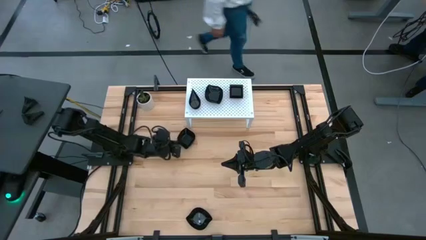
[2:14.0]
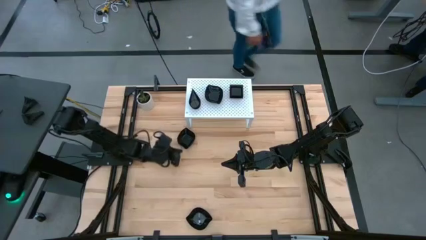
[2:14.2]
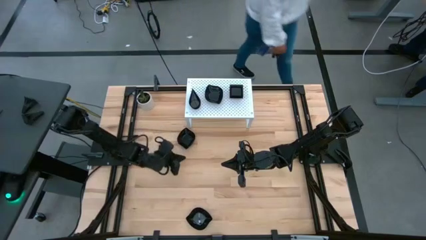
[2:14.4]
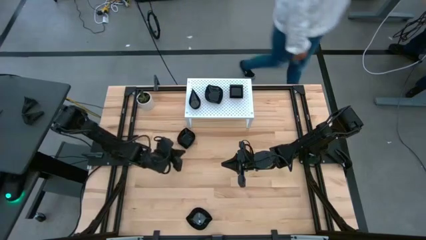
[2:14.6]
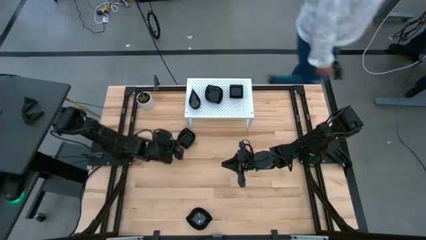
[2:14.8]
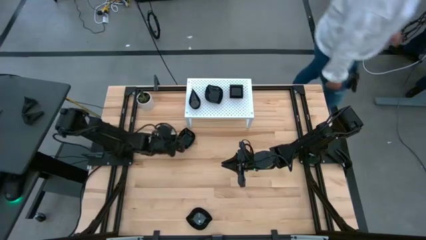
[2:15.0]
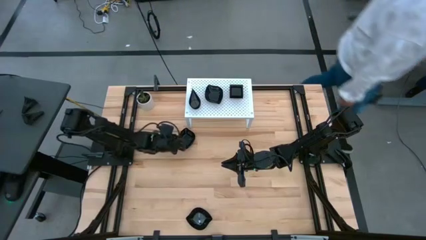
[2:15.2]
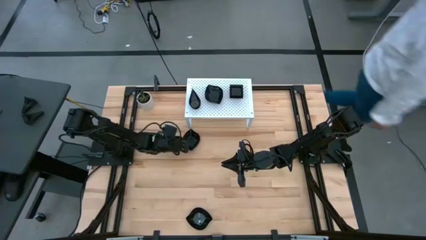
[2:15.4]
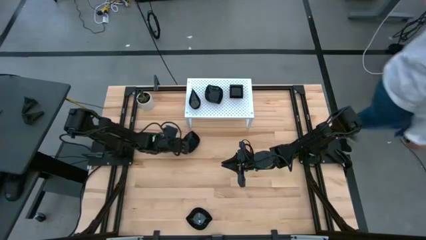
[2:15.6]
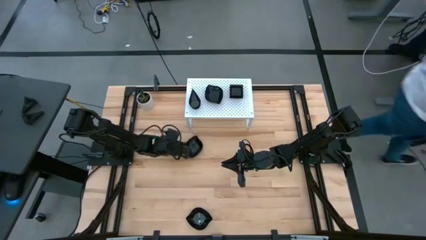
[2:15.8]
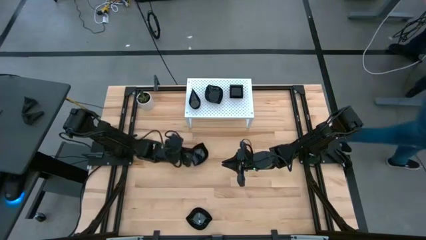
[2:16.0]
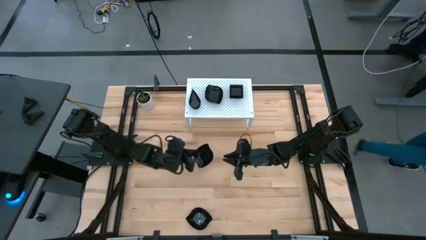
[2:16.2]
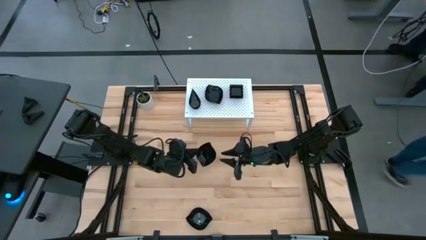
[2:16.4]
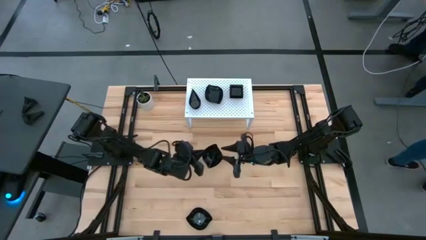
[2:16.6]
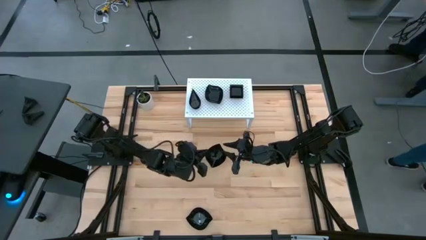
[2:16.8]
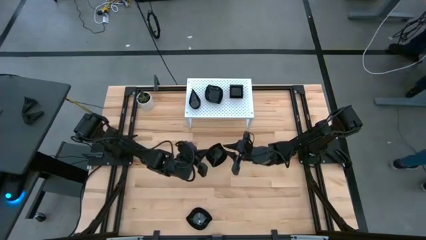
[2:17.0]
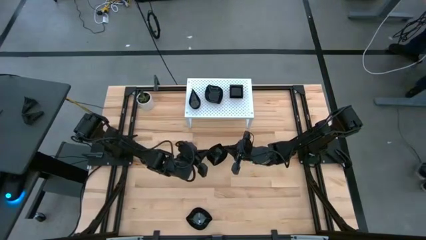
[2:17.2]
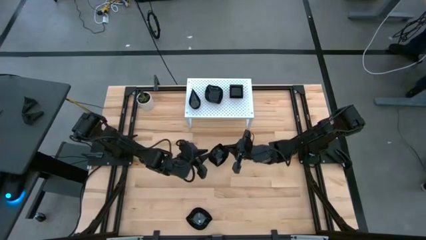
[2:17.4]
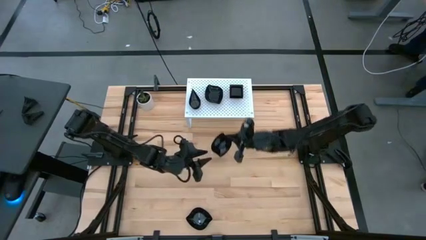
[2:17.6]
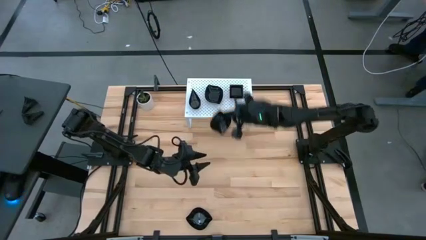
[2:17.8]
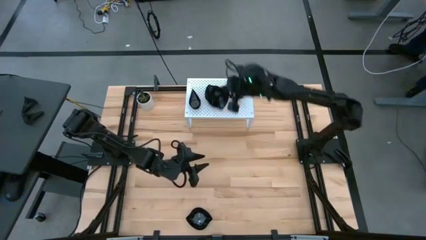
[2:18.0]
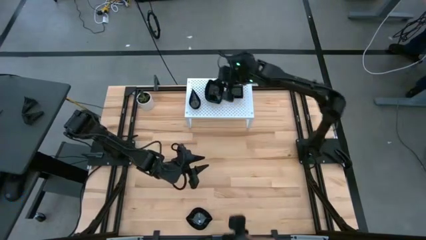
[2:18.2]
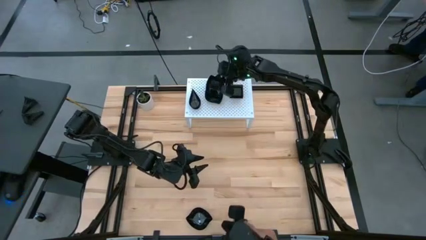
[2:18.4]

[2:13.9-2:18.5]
Task: Pick & Place Mini shaped plates
Stack the black leaf-shaped plate on top of the other black leaf-shaped plate on the shelf

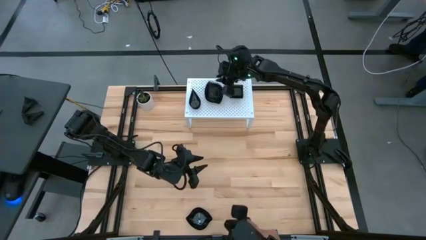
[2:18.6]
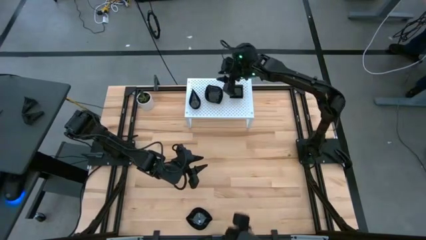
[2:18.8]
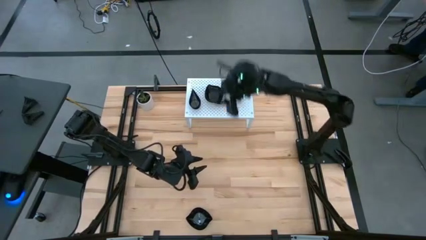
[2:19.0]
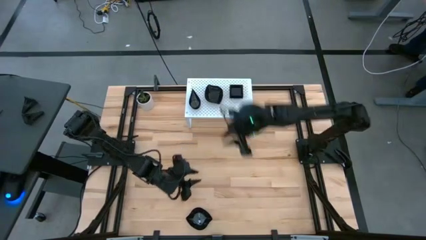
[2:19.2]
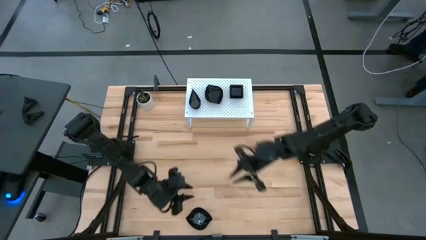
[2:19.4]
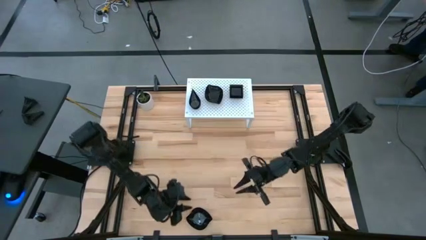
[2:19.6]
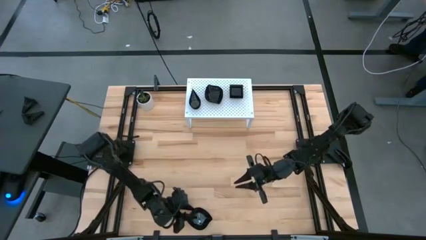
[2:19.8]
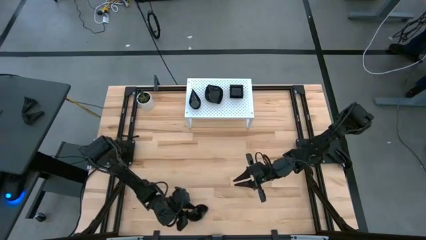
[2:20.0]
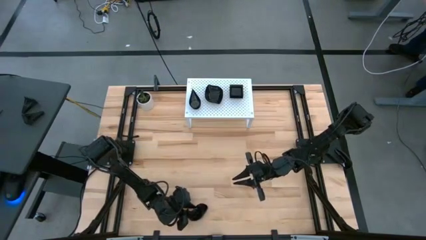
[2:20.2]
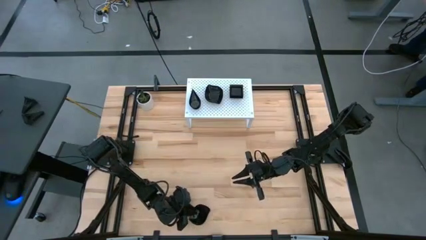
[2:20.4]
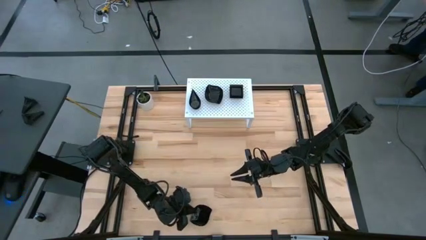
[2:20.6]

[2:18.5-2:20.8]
Stack the black leaf-shaped plate on top of the other black leaf-shaped plate on the shelf

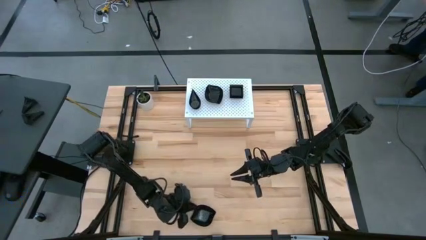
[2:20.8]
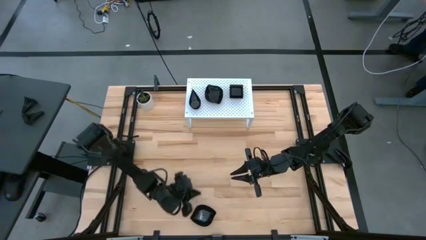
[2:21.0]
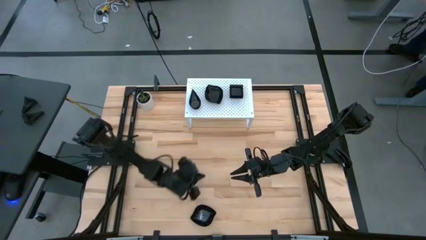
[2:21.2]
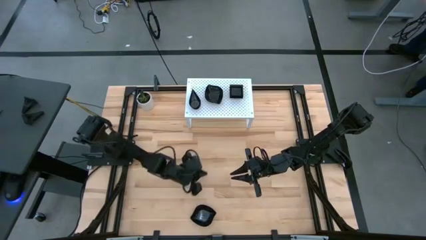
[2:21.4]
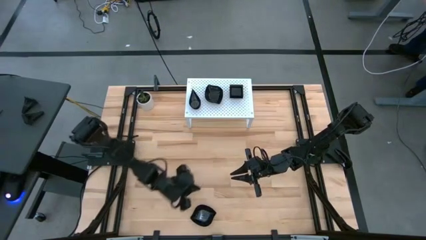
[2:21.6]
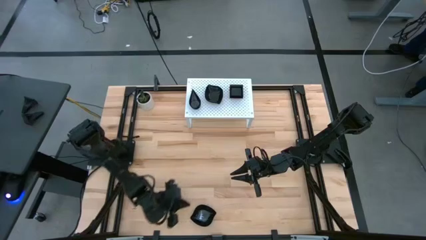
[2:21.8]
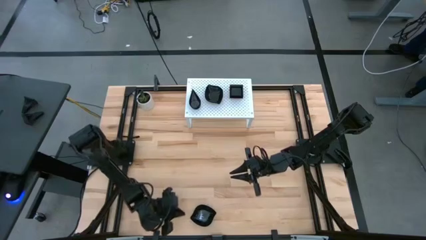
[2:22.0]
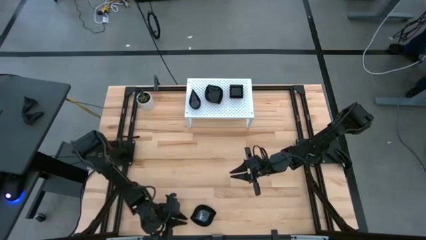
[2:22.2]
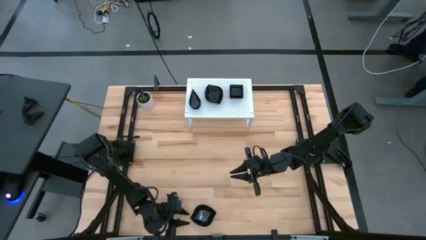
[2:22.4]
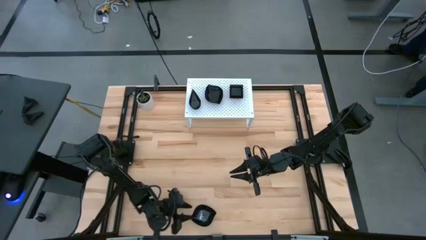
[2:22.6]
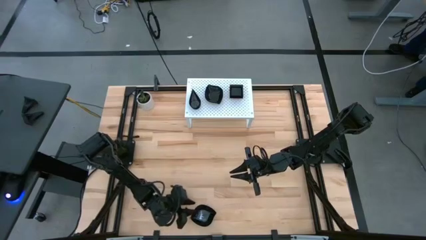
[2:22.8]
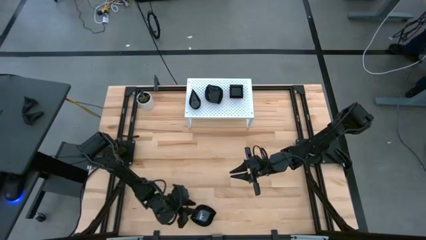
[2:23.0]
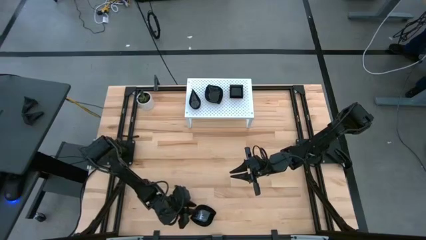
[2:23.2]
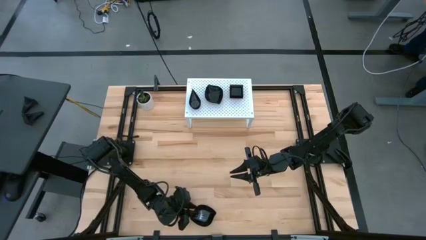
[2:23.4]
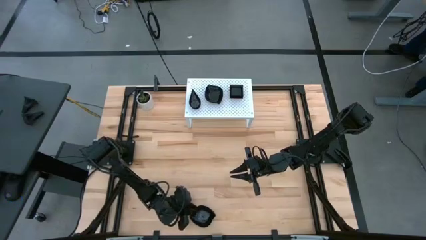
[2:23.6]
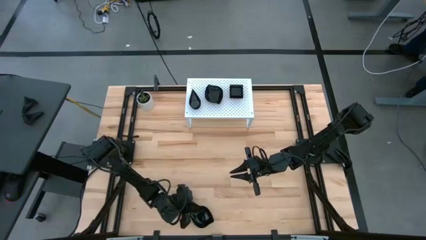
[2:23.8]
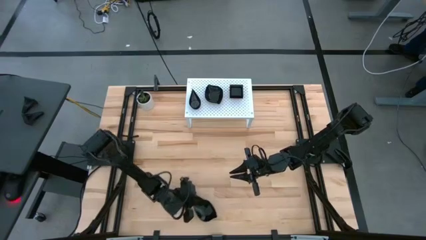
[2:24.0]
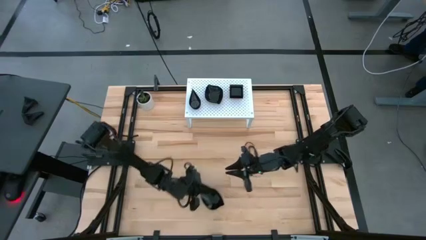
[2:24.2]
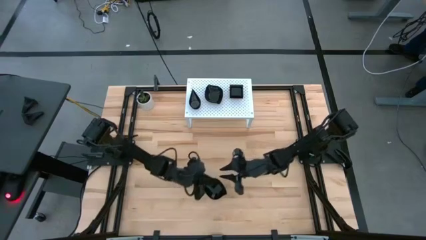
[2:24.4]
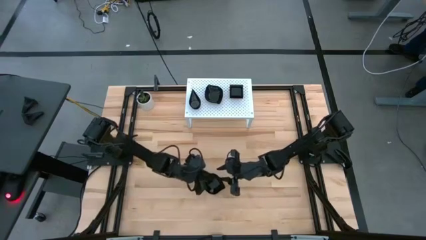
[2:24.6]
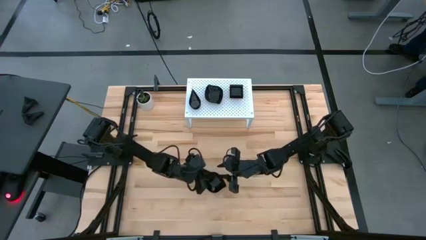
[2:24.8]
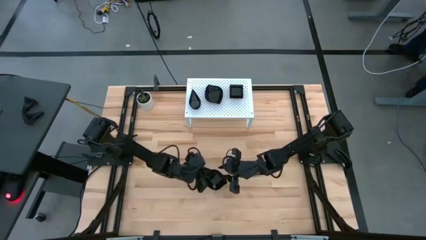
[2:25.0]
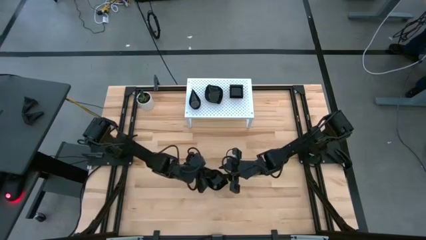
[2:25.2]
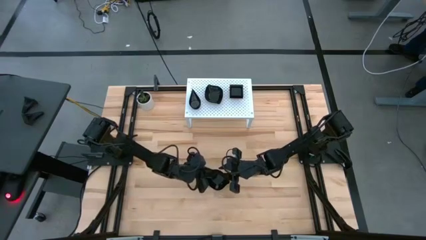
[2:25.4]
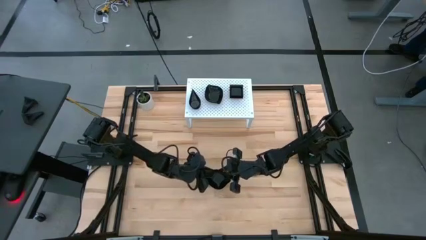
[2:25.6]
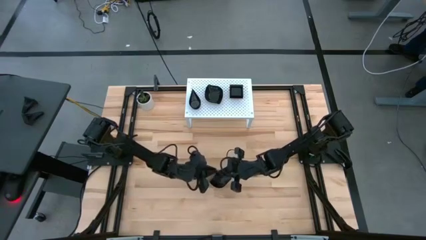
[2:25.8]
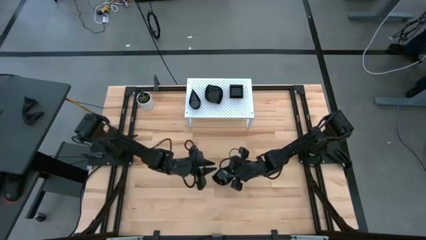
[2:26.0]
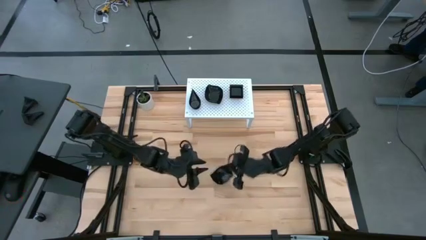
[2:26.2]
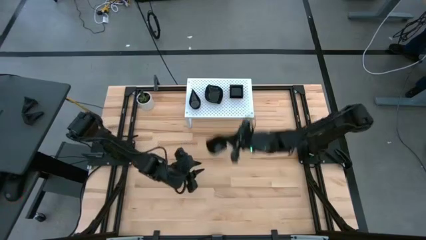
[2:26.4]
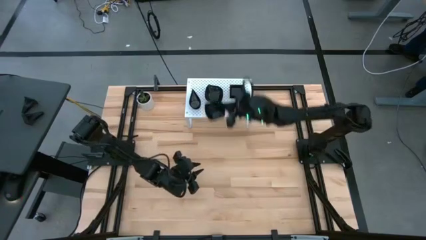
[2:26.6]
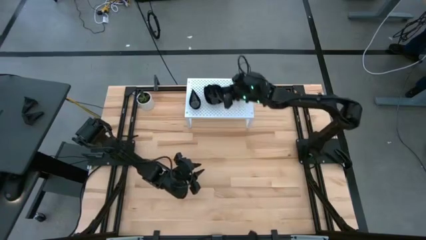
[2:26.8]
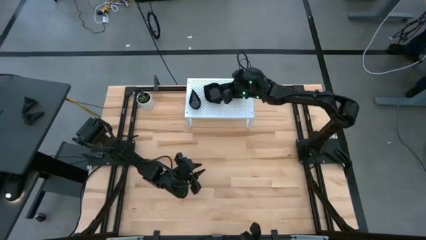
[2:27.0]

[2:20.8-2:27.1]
Stack the black leaf-shaped plate on top of the other black leaf-shaped plate on the shelf

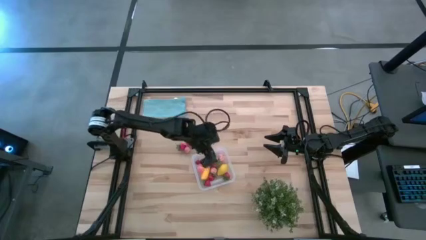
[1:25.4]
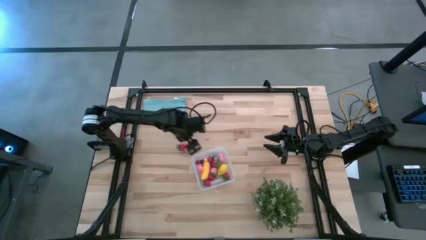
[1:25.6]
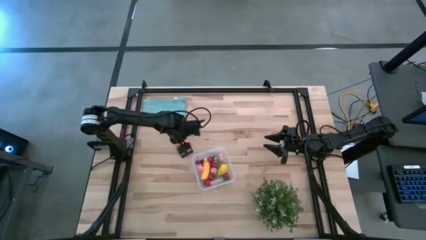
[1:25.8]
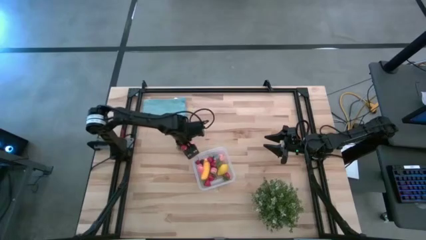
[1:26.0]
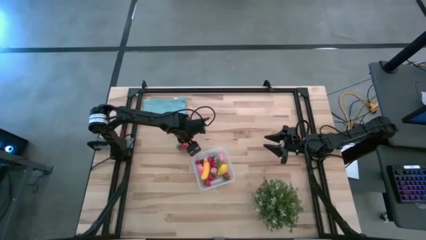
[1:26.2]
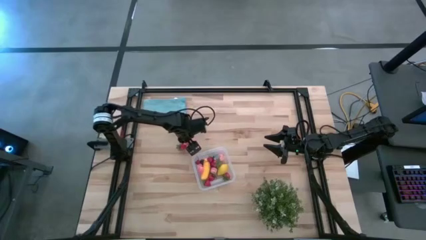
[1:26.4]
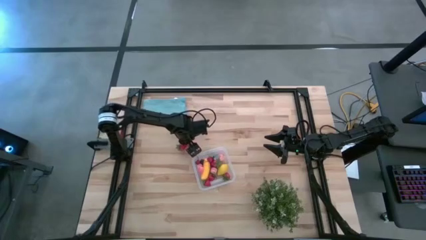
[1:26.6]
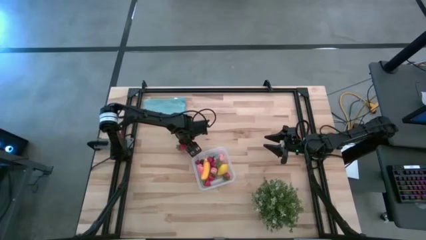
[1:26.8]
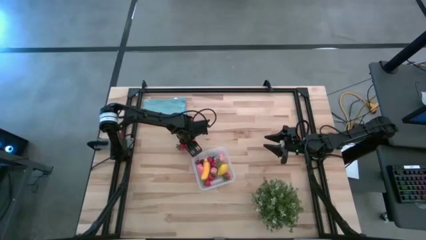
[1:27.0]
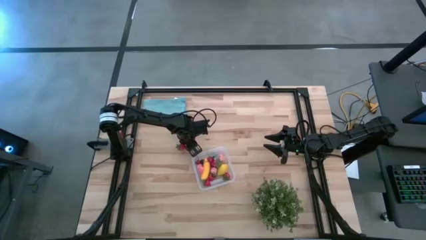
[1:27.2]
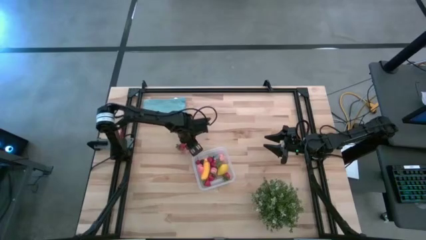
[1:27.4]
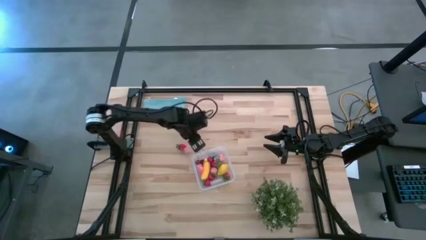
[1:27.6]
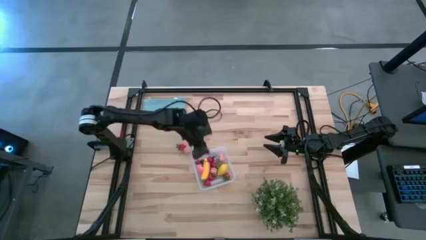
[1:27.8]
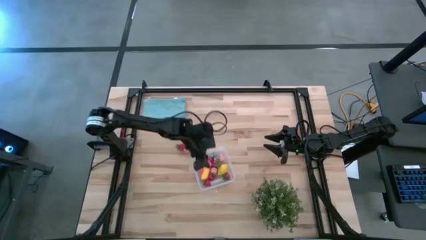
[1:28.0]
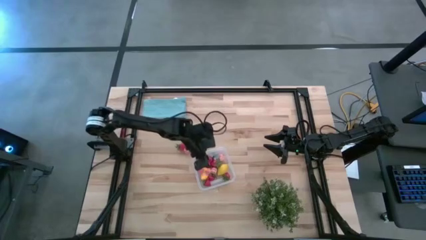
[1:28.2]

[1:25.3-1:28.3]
Task: Pick and placing Produce into tupperware
Put the pink peach into the transparent bin
